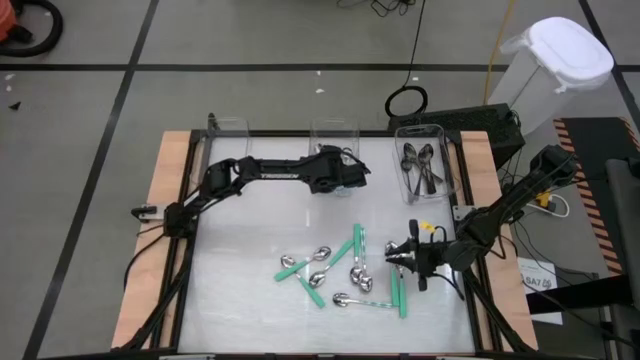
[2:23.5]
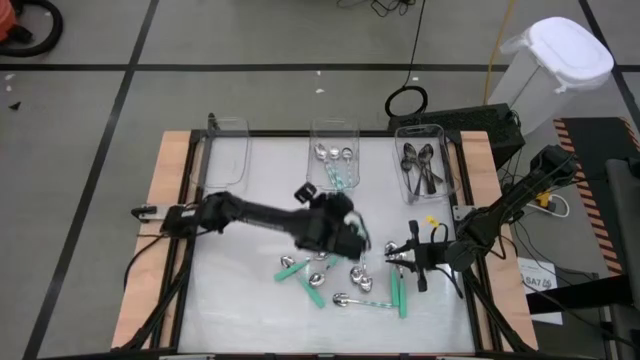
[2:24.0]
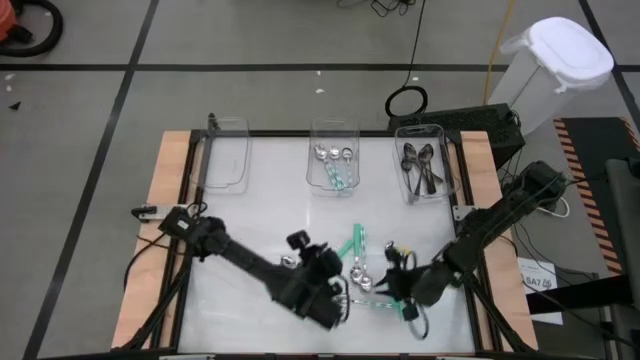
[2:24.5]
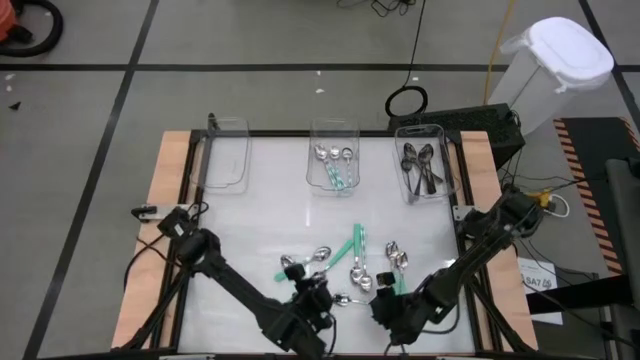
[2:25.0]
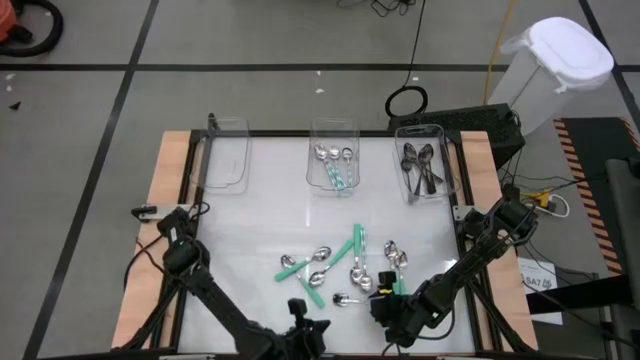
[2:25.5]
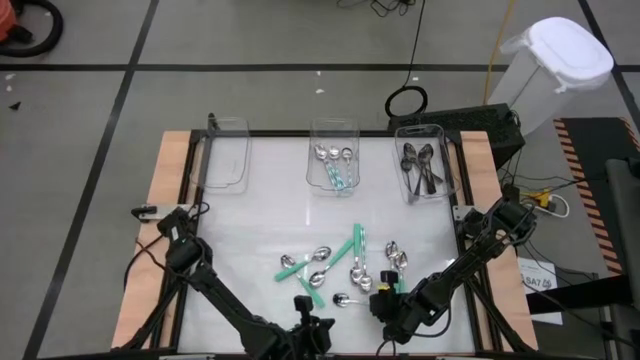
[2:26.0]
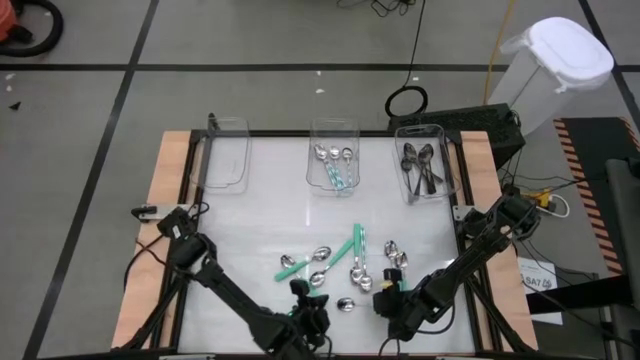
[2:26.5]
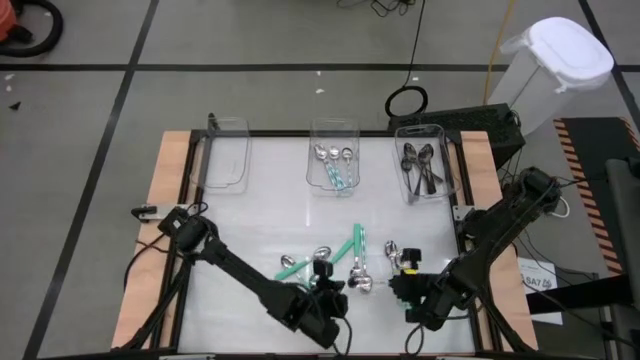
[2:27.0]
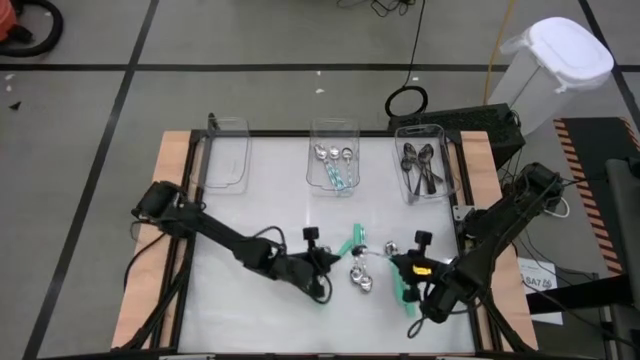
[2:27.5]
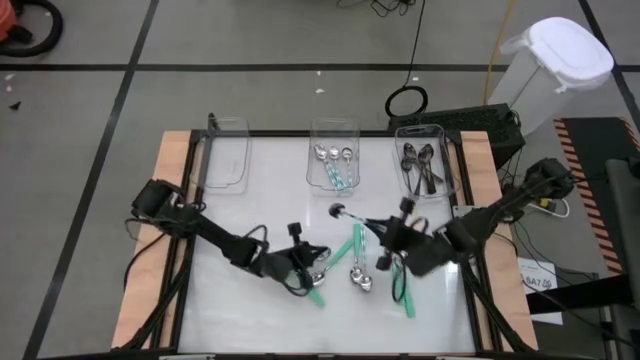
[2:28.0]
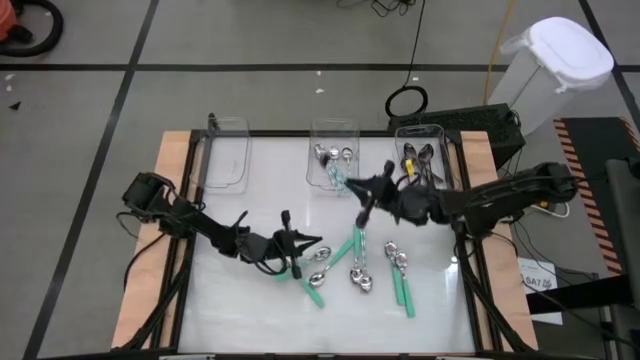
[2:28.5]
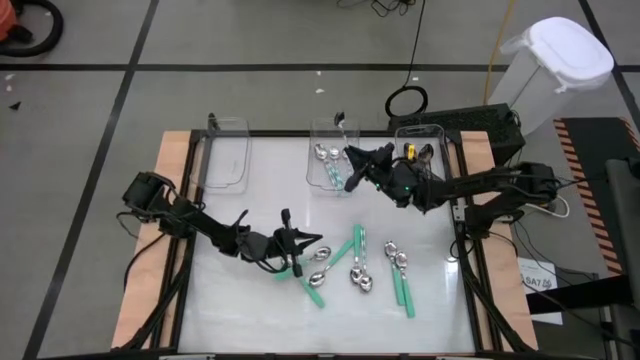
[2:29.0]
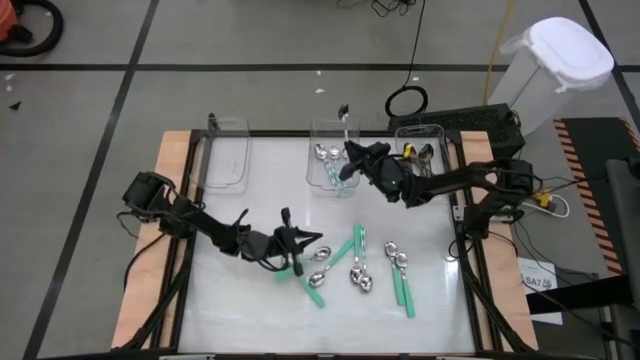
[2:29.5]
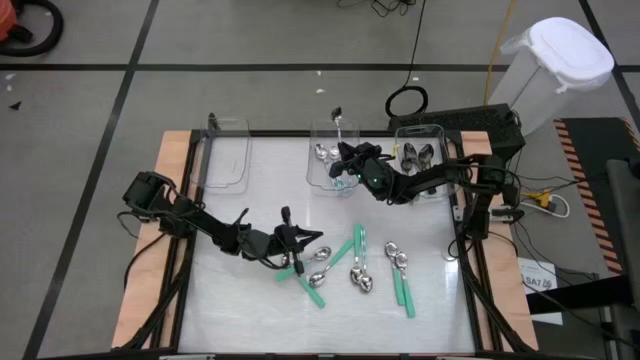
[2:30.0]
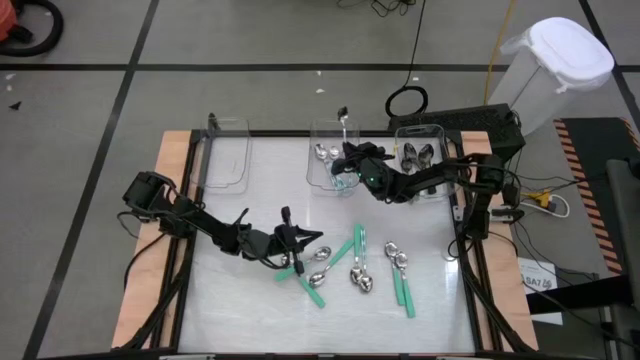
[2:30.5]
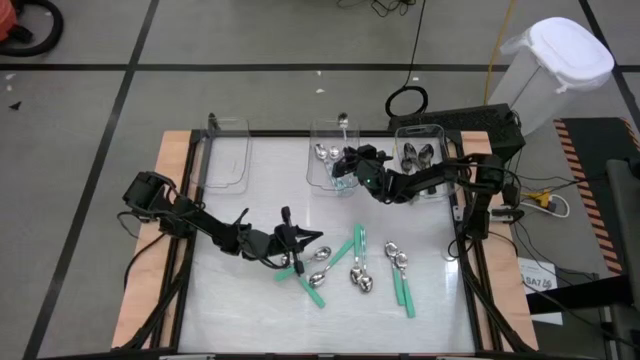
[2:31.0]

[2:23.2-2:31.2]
Task: Sort silverware by color (type)
Put the white-green spoon into the middle transparent bin

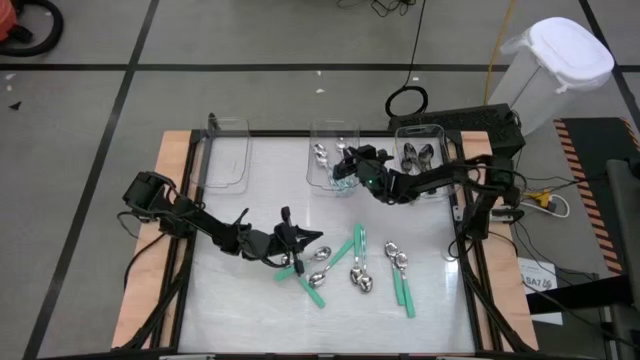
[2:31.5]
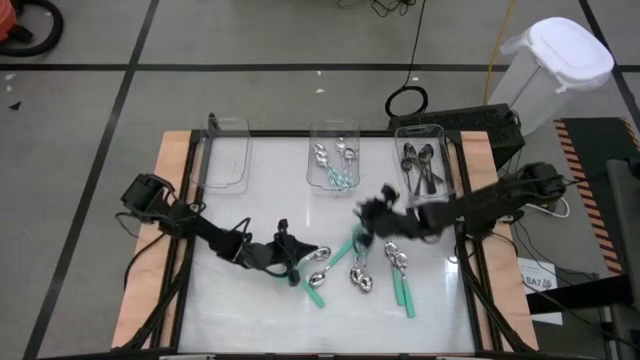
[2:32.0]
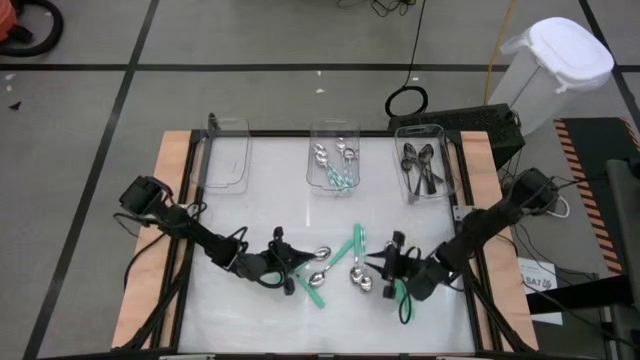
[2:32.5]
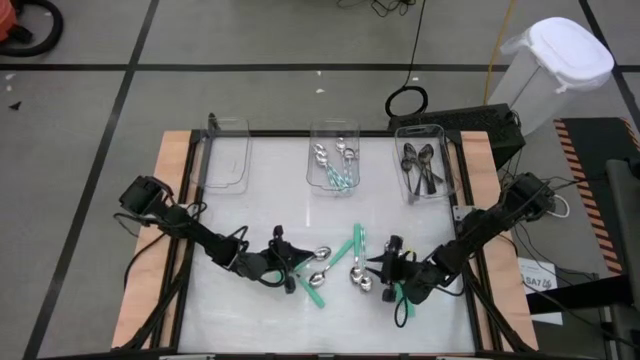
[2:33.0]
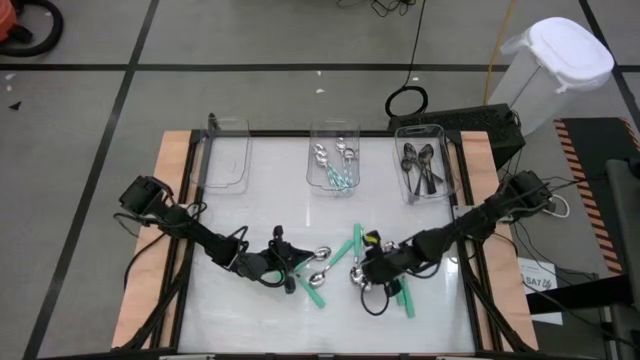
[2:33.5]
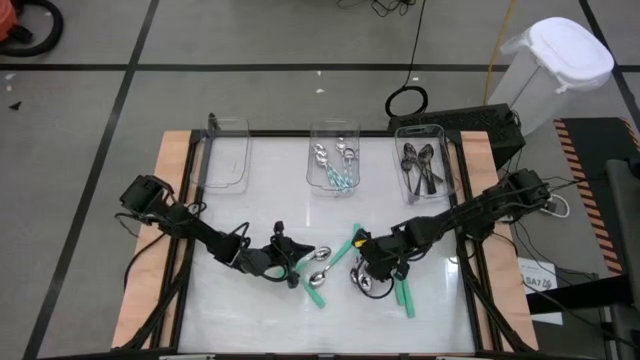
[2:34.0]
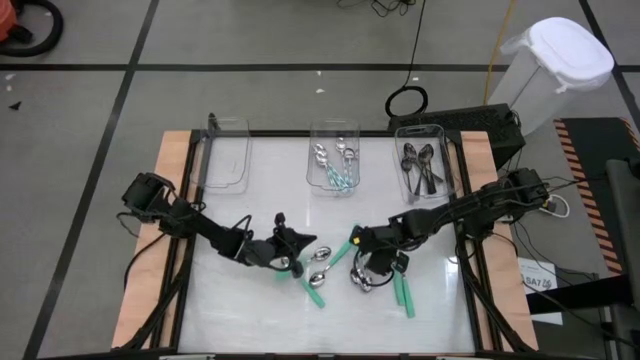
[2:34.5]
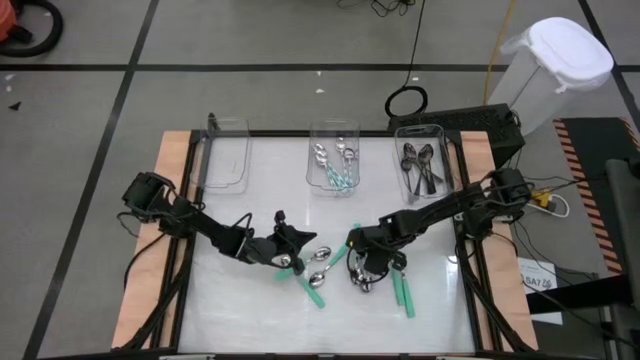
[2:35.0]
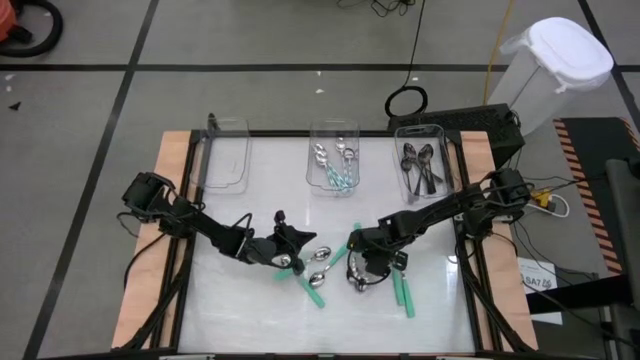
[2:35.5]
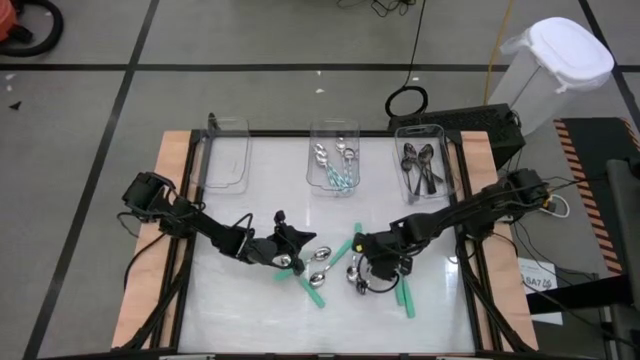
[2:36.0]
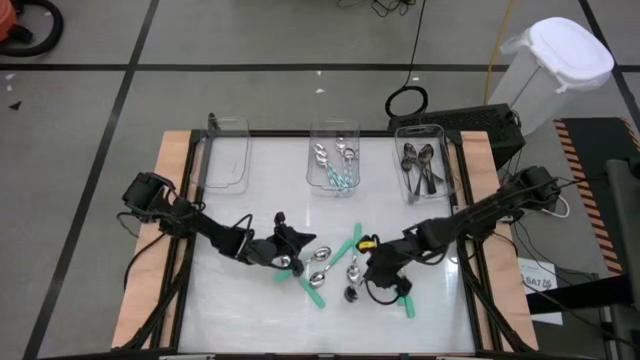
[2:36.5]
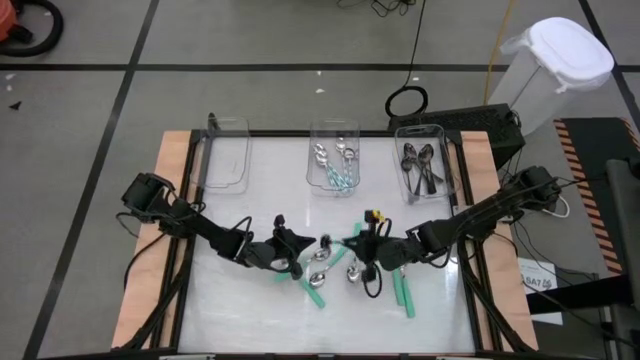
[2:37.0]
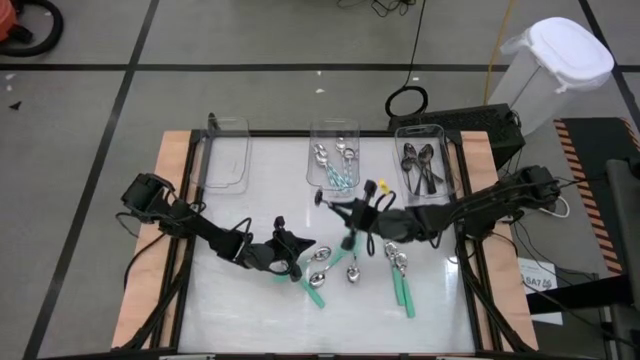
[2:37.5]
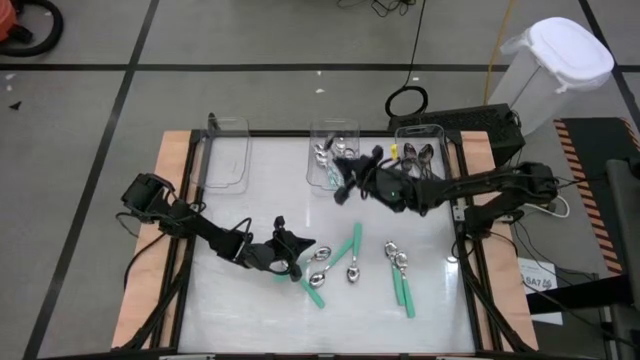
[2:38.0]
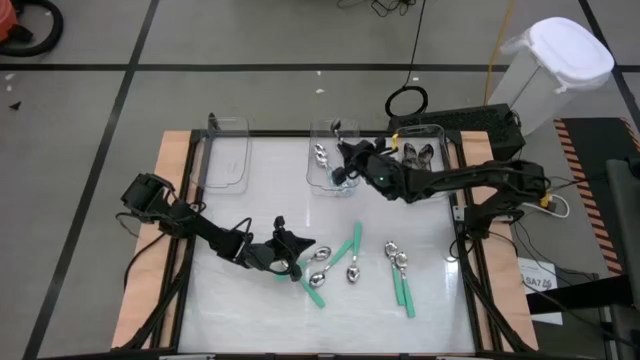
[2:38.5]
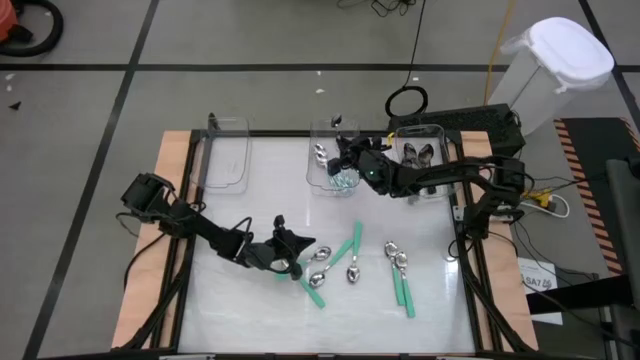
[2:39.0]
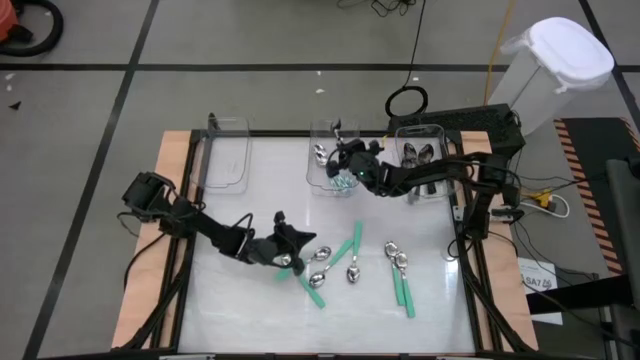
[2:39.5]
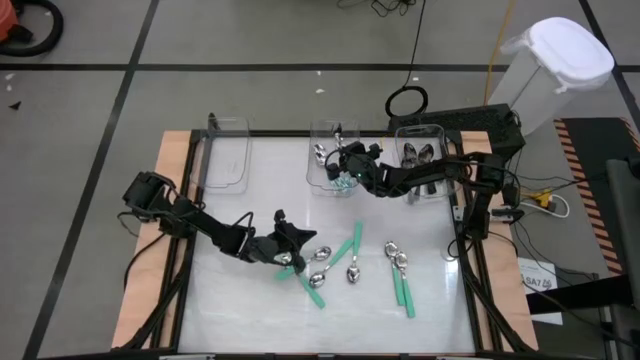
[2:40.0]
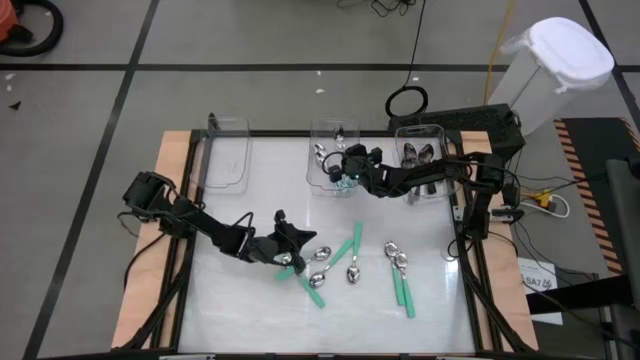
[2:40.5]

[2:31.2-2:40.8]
Put the white-green spoon into the middle transparent bin

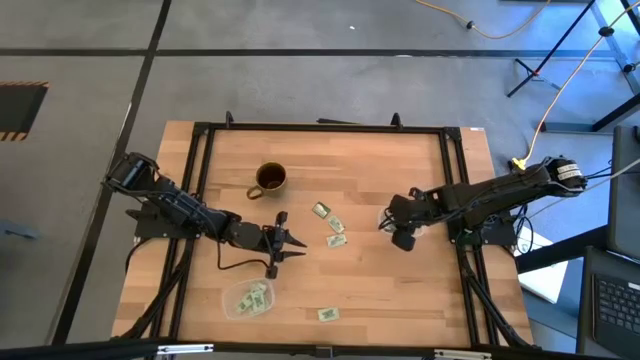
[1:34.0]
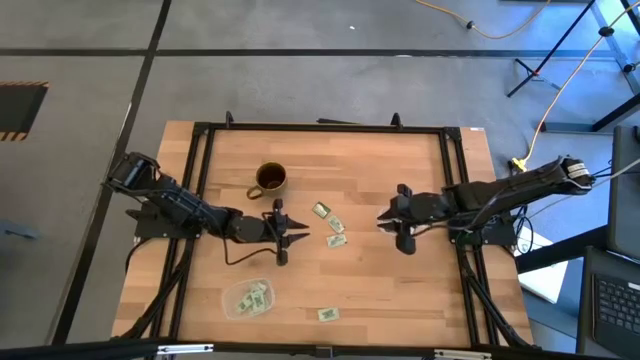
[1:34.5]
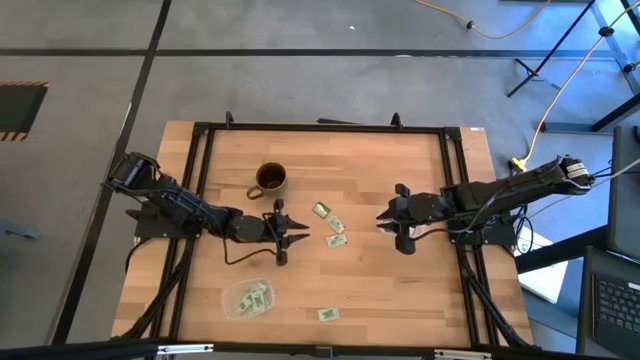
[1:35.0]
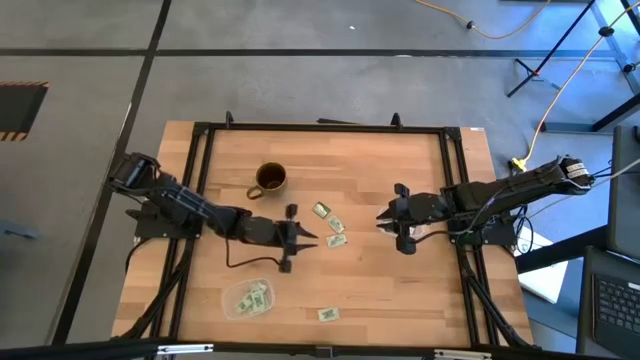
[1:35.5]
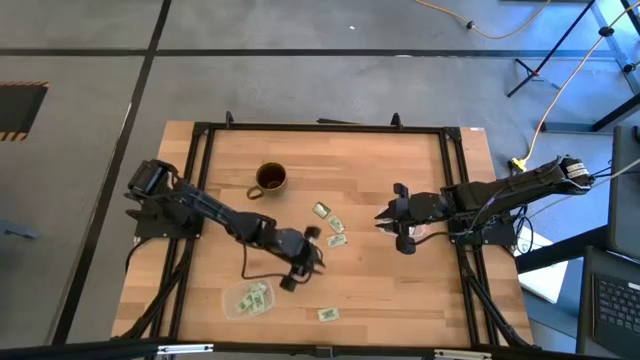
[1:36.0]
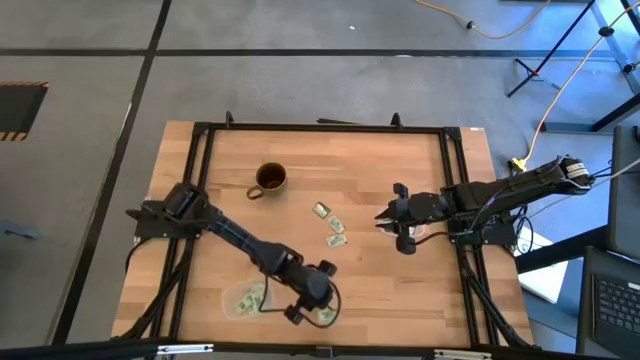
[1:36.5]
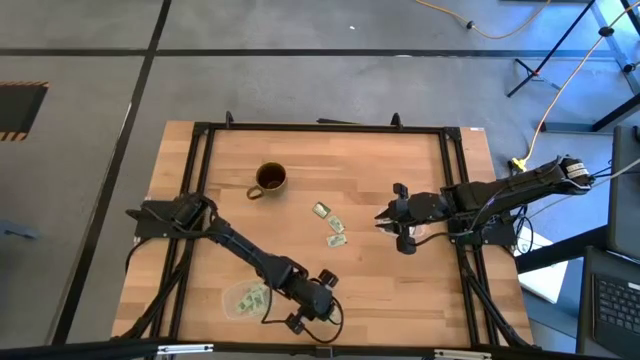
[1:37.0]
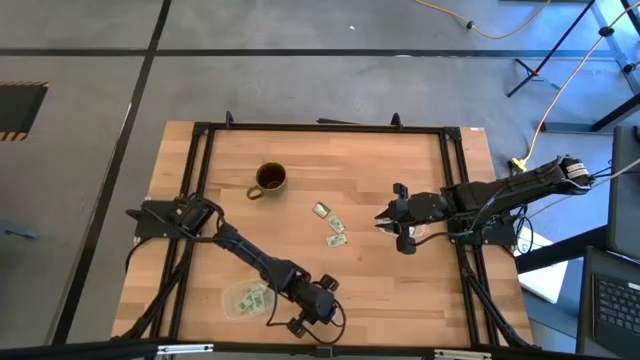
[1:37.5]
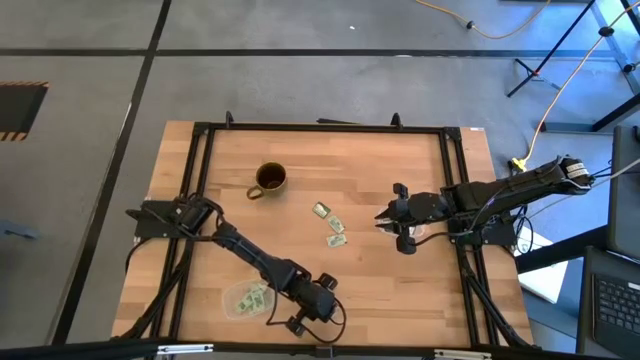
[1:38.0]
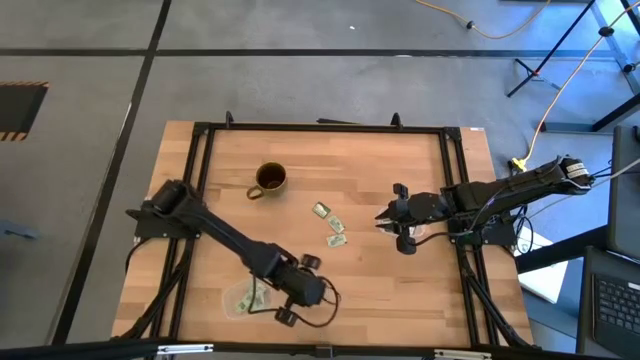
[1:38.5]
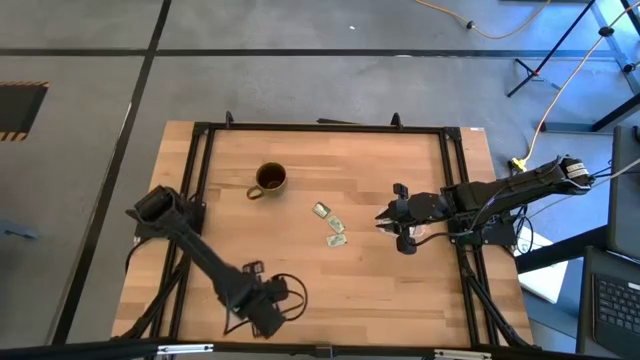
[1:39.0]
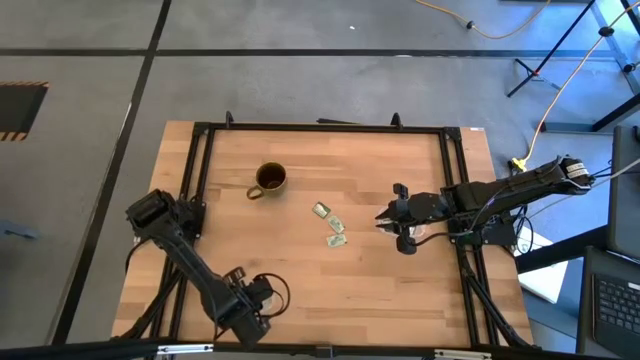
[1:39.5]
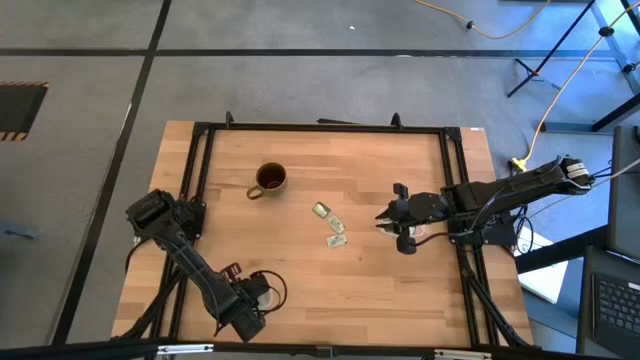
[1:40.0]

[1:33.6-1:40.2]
Task: Pick and place Stevia / Truvia into bins
Put the stevia packet into the bottom transparent container
